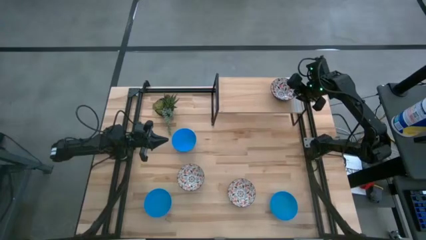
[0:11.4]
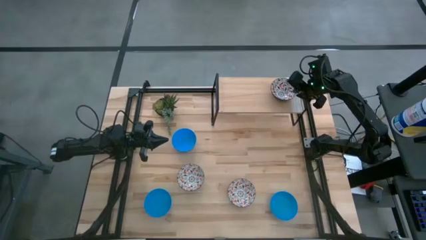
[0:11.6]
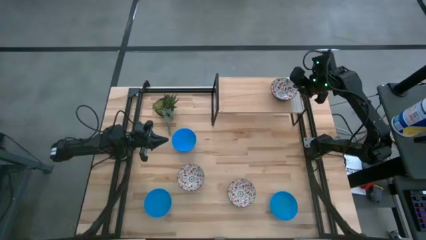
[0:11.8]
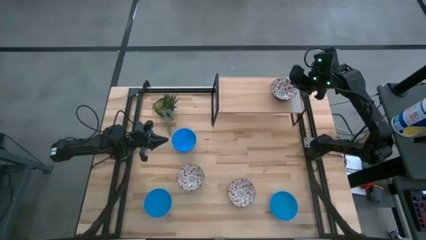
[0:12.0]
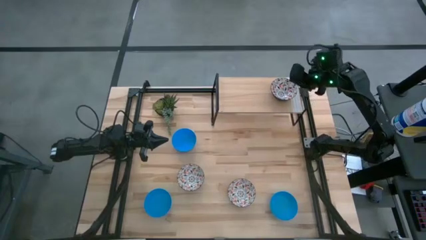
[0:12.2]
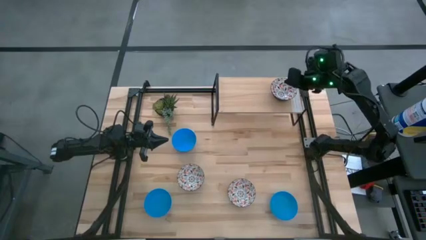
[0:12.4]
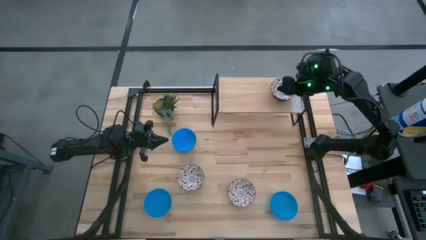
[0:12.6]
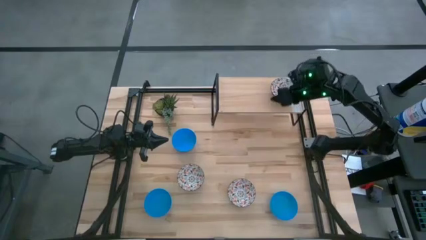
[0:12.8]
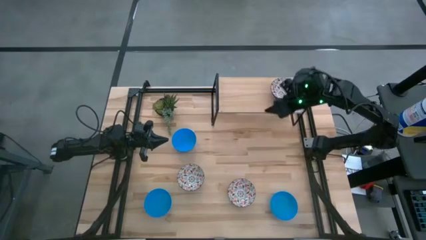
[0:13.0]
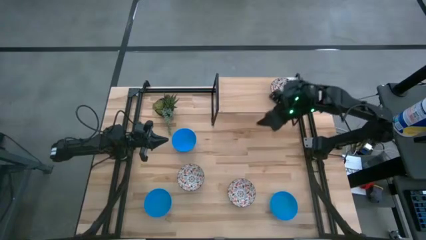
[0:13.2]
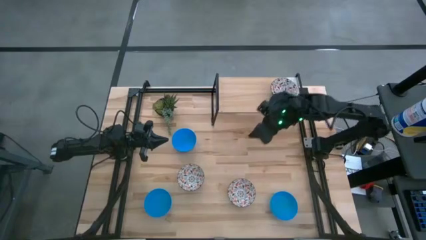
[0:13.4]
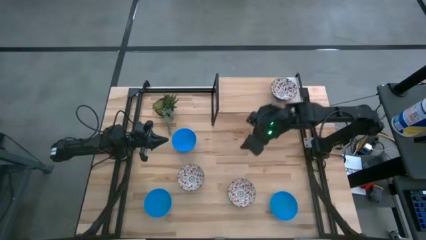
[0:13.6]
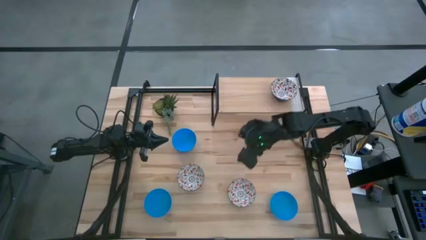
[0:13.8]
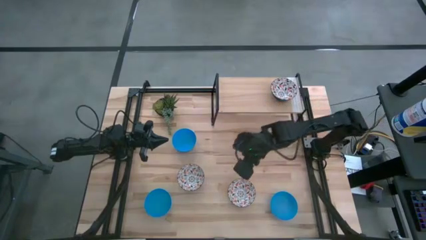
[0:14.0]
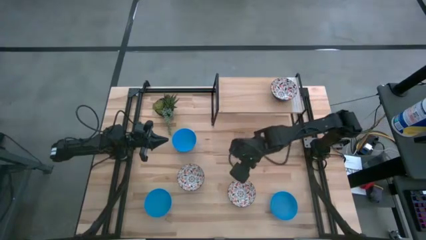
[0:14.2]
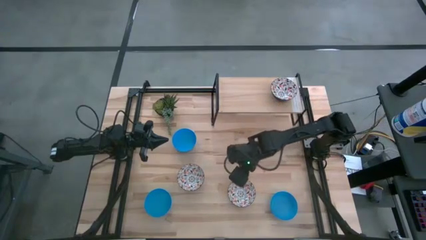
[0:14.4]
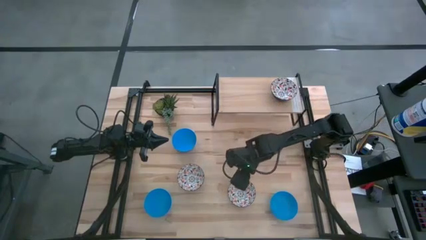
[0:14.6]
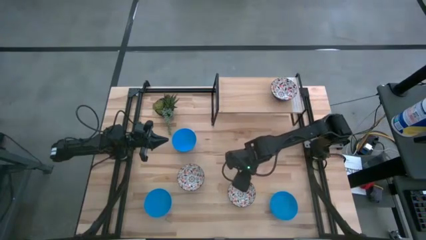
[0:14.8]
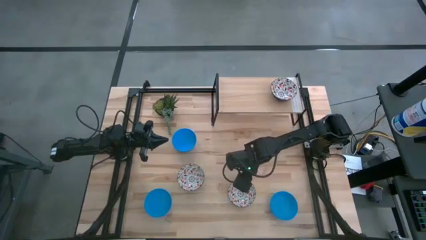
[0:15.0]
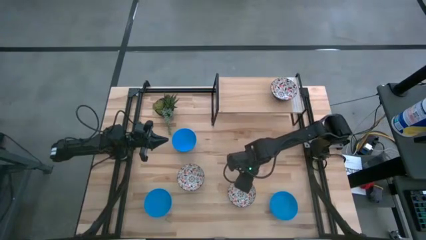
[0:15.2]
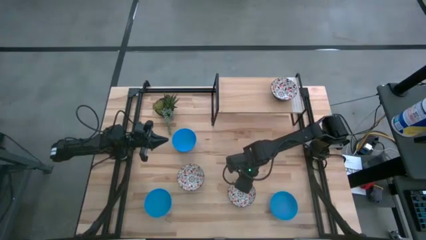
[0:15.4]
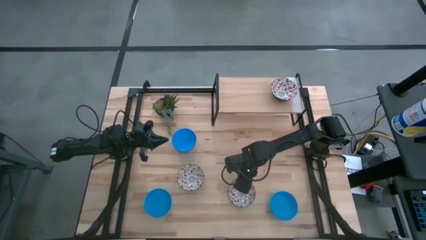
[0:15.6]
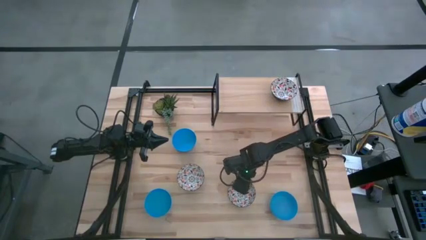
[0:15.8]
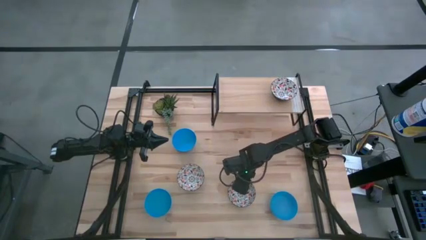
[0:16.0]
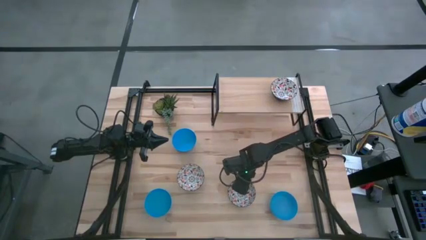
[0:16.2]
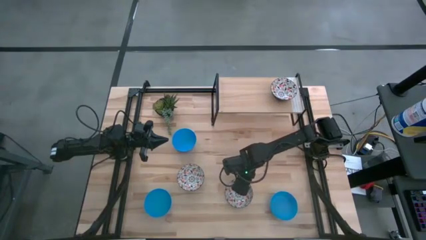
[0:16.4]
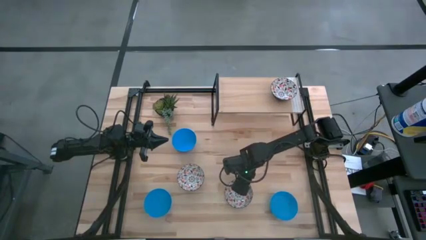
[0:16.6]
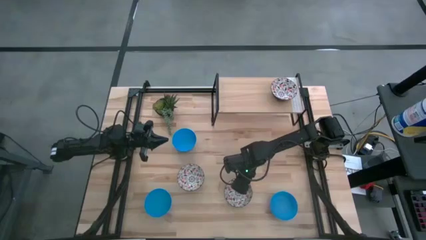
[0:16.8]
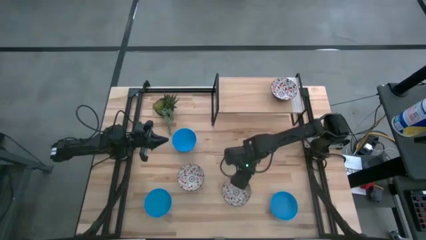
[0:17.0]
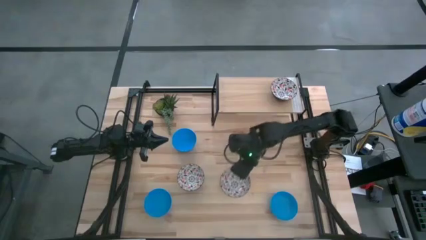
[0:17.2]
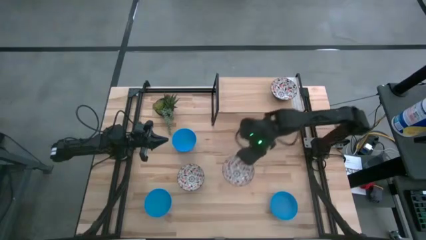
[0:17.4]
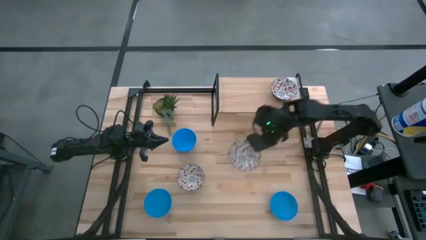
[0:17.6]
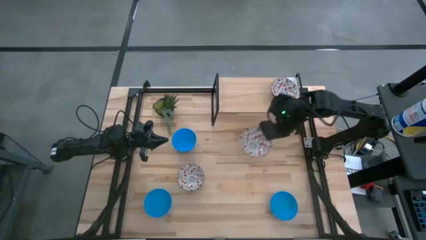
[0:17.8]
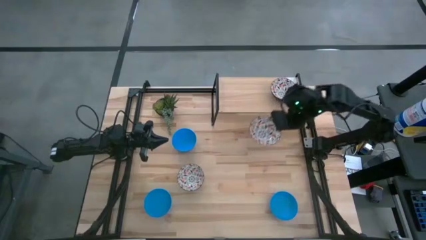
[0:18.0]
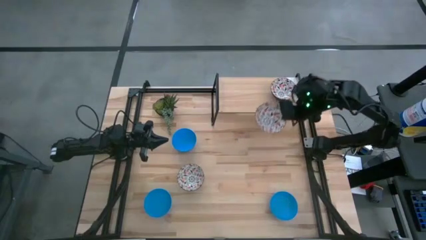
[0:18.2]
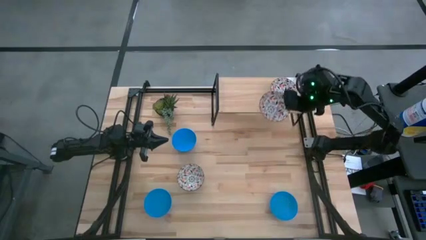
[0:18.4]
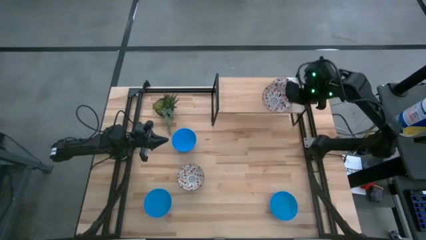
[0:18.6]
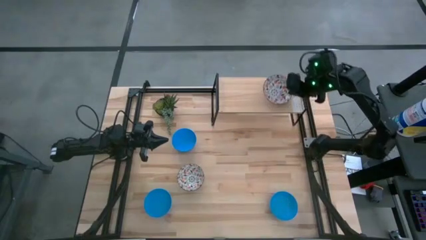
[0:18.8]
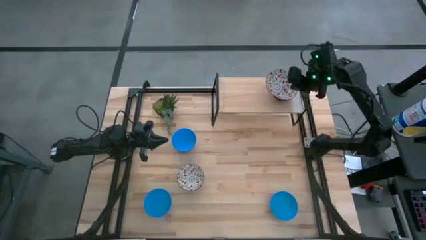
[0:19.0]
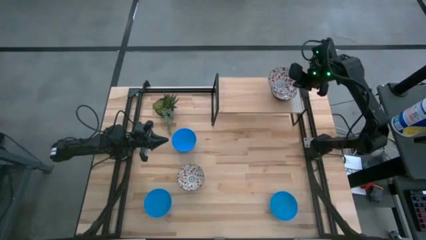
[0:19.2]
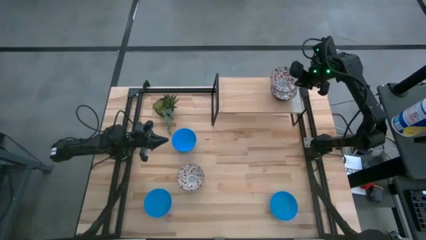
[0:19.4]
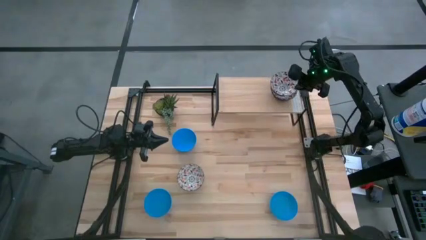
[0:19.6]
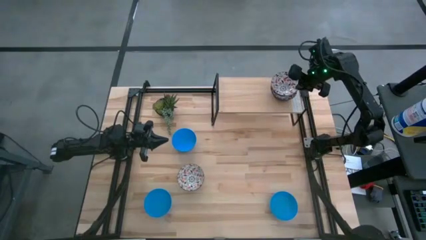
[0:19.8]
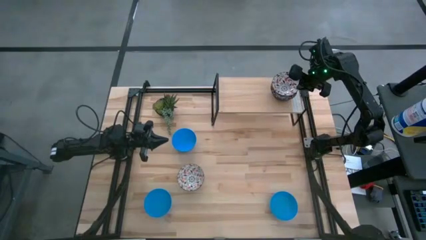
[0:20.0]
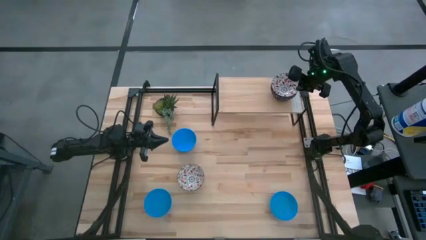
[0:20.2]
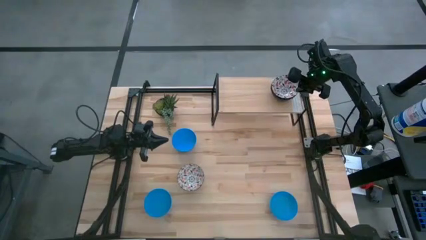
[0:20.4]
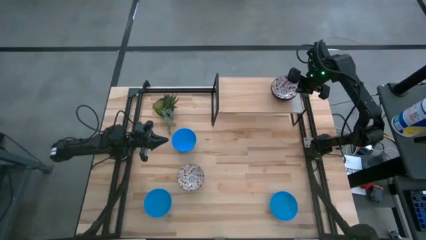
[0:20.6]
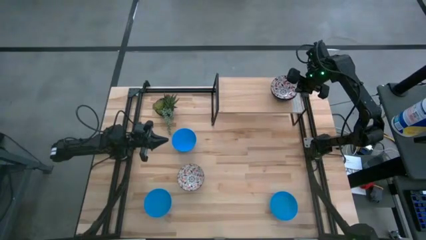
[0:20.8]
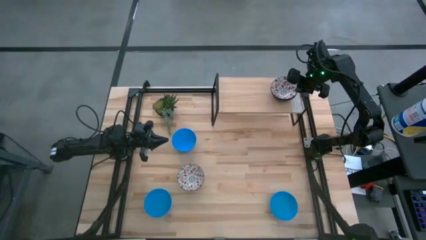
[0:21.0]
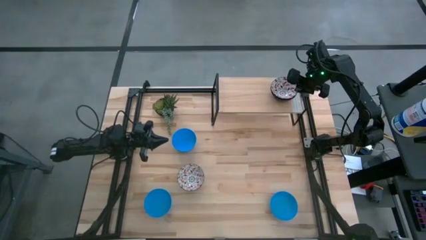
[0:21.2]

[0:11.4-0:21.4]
Task: Pick & Place Mini bowls
Stack the right white patterned bowl on top of the other white patterned bowl on the shelf

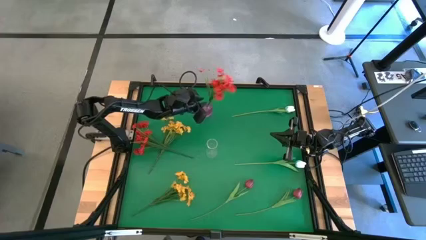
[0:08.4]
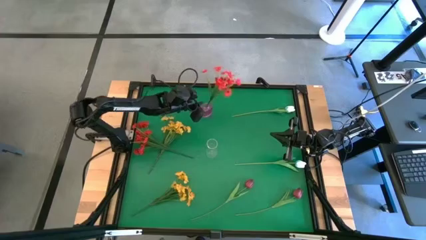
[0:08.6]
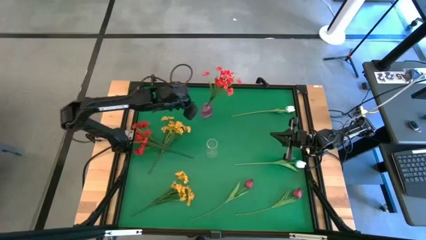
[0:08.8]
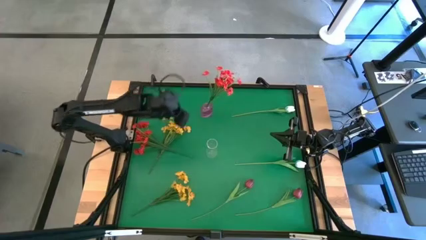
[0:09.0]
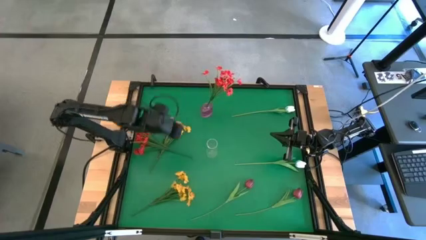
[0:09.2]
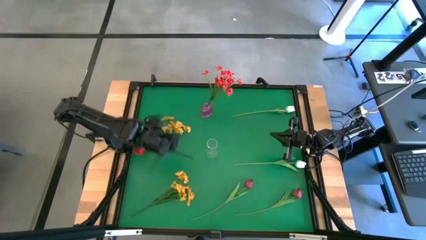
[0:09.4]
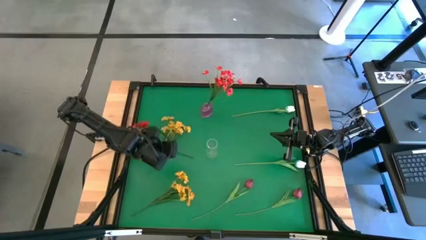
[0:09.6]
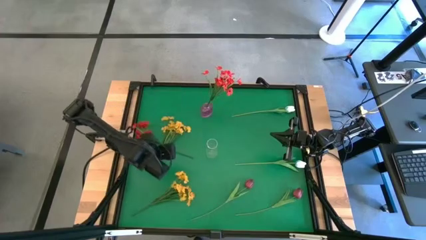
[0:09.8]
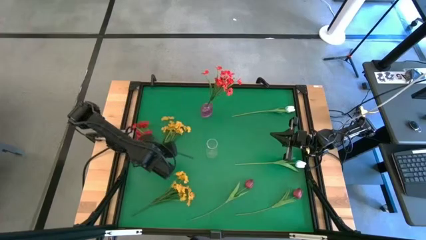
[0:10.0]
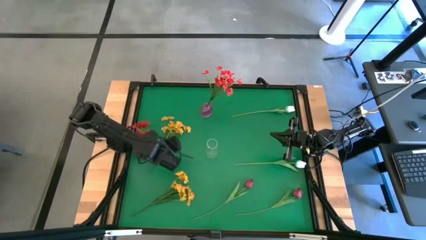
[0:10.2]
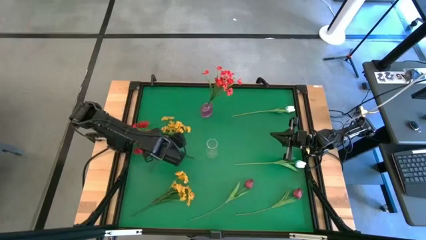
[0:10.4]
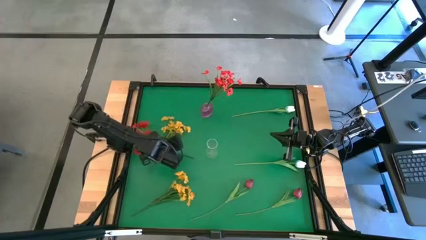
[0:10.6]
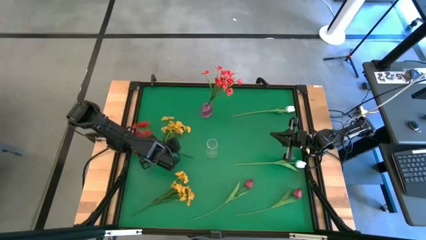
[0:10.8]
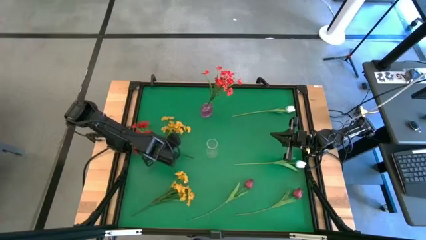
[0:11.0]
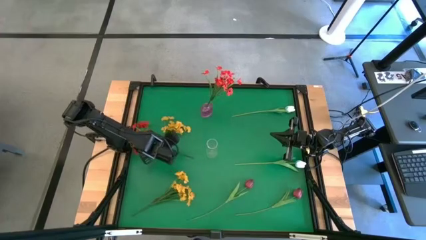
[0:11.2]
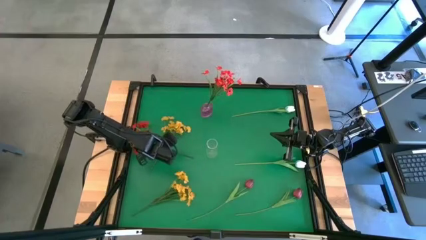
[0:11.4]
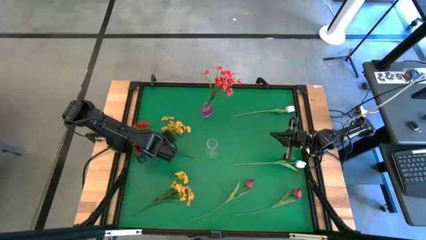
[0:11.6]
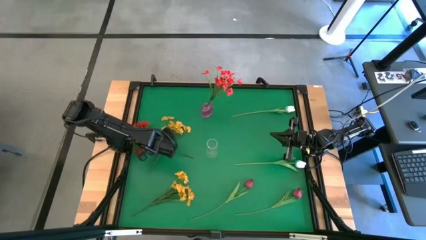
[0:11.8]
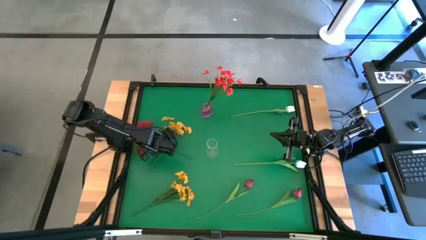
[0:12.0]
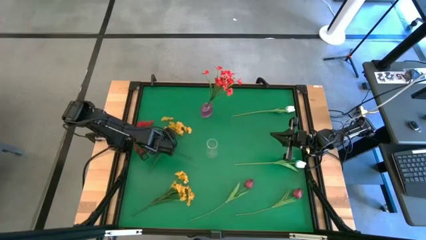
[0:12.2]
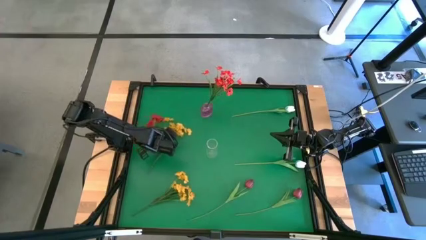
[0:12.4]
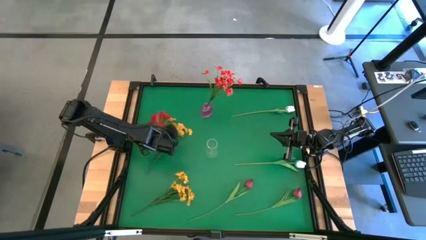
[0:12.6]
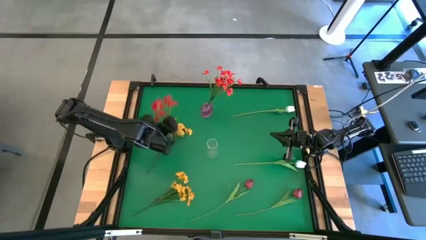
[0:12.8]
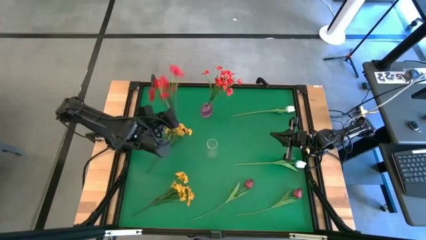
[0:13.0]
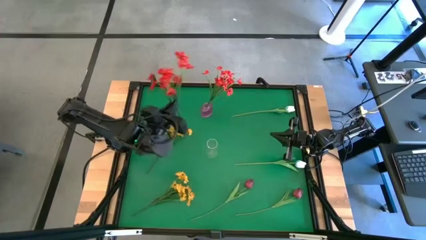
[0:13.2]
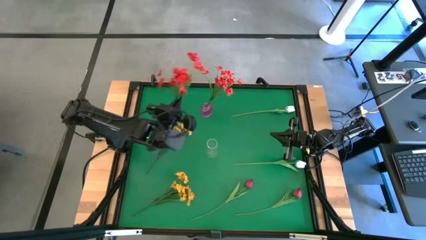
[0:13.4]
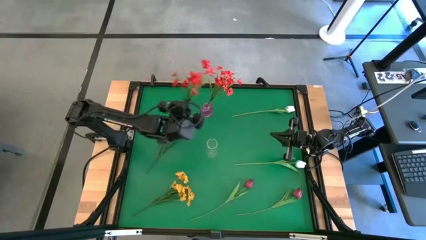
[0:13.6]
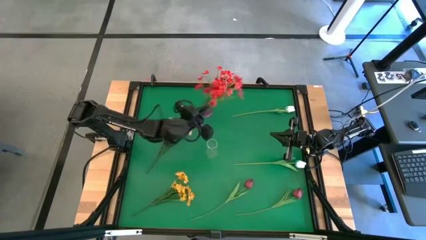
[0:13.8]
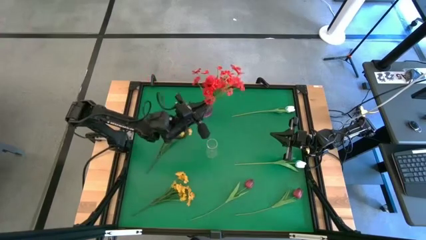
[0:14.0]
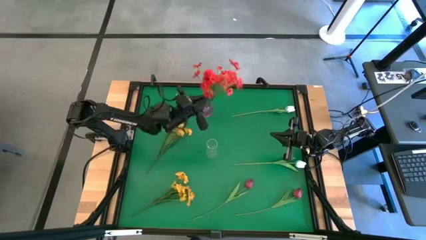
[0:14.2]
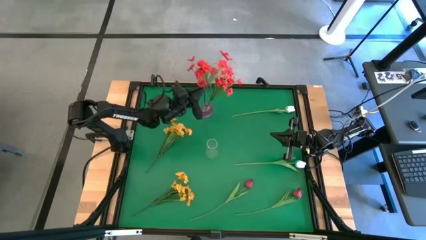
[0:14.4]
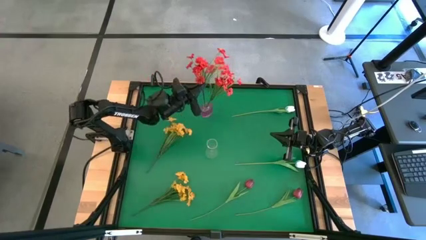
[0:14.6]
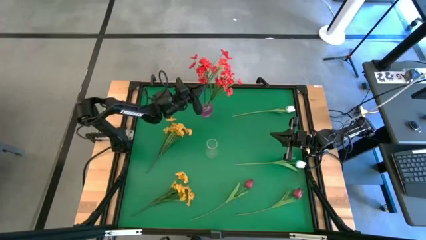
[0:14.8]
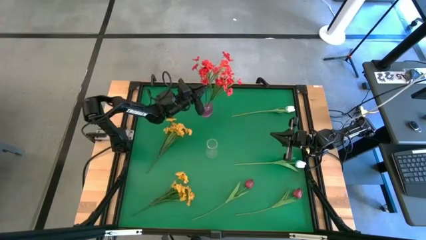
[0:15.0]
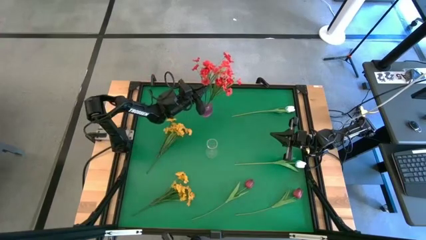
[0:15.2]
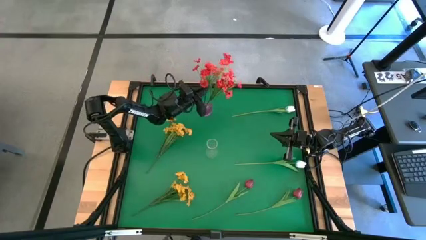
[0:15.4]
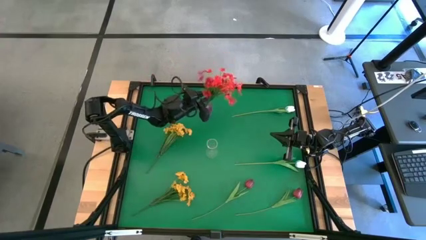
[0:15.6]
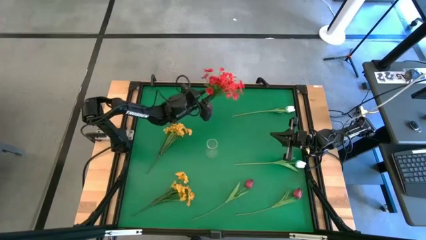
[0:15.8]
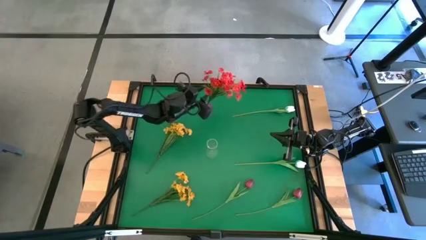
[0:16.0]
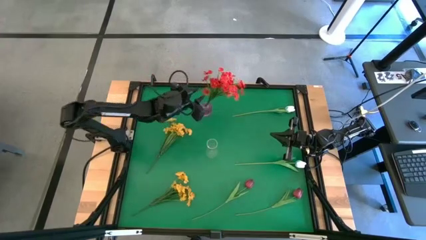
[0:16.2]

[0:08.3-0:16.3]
Task: Sort flowers into vase by color
Put the red flowers into the violet vase
